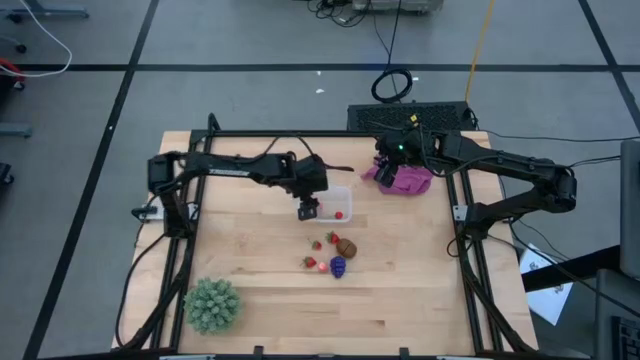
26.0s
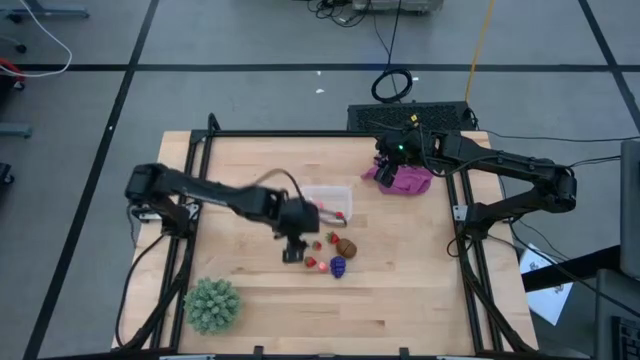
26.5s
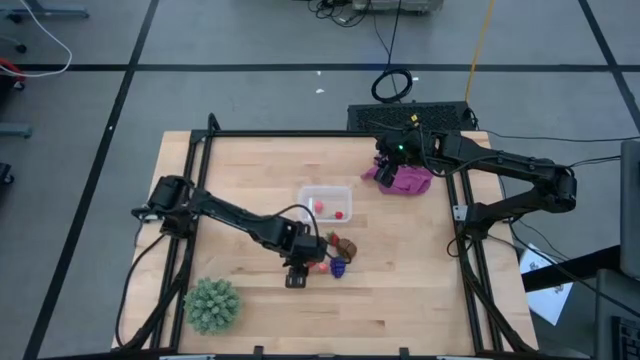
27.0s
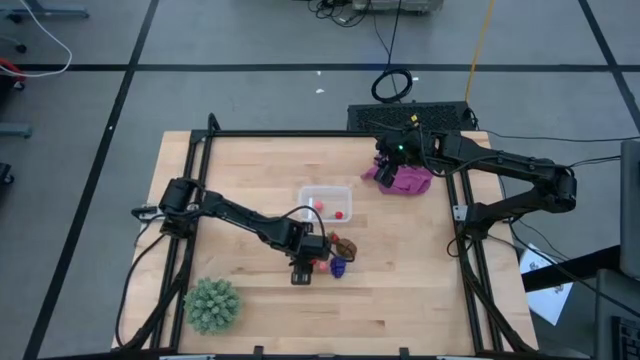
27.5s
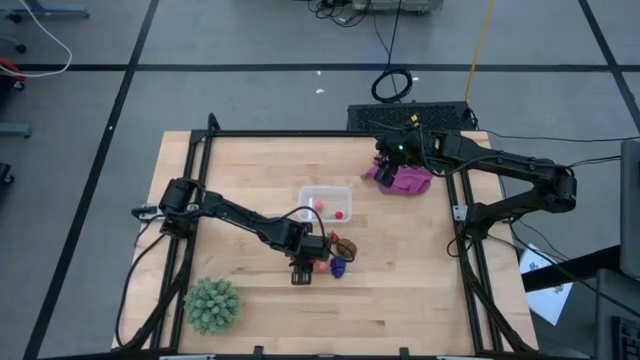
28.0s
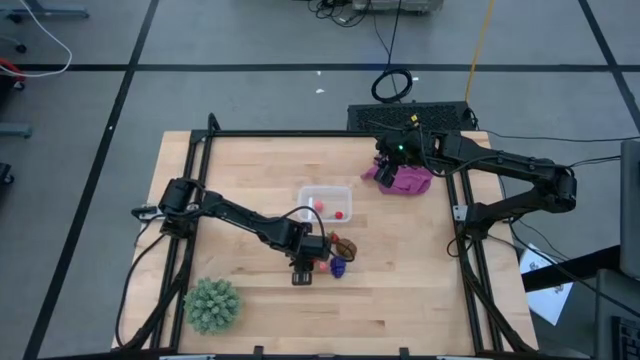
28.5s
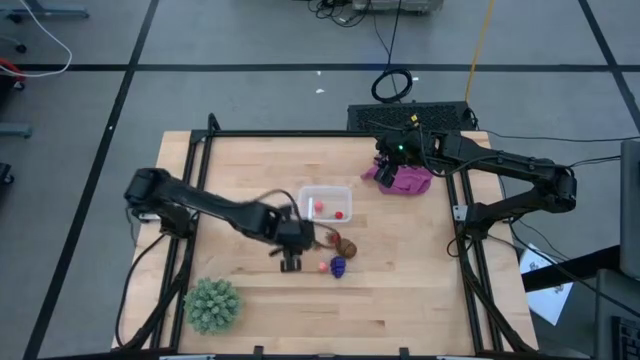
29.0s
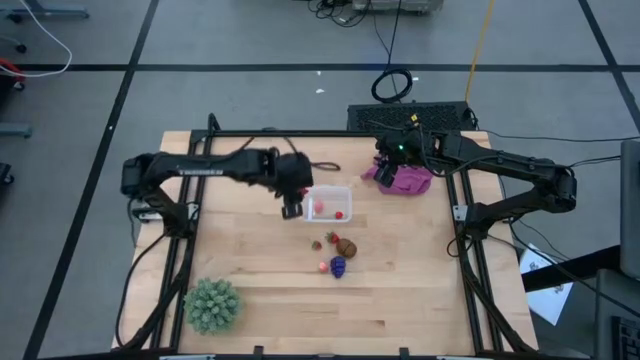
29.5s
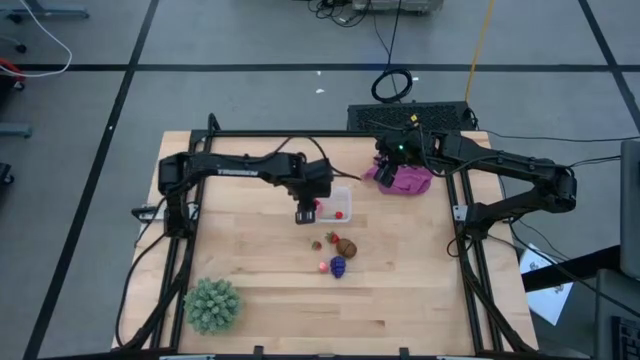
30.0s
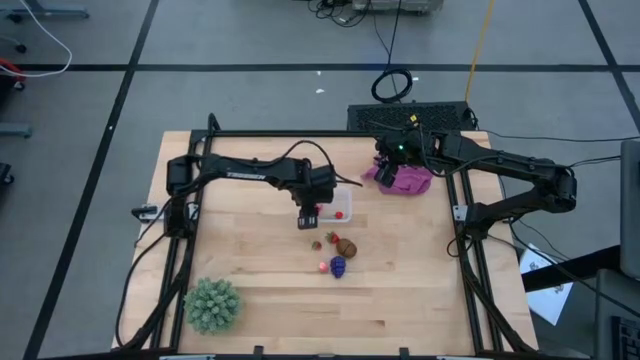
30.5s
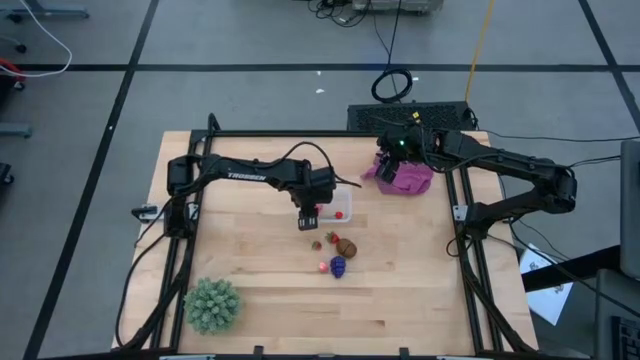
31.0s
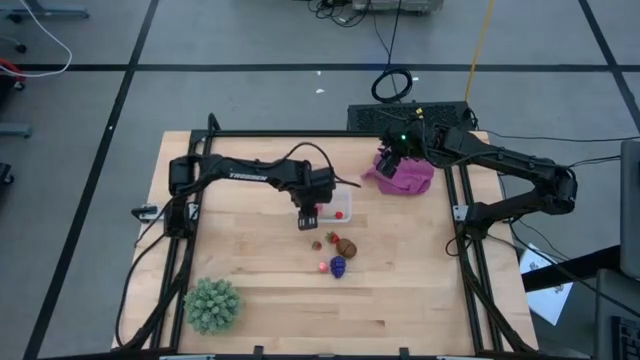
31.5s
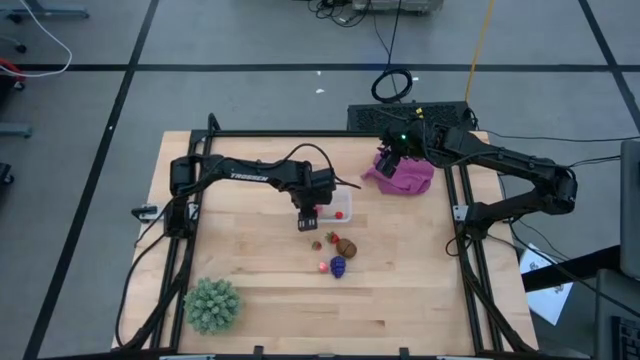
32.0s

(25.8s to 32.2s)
Task: Pick and placing Produce into tupperware
Put the bottom strawberry into the transparent bin

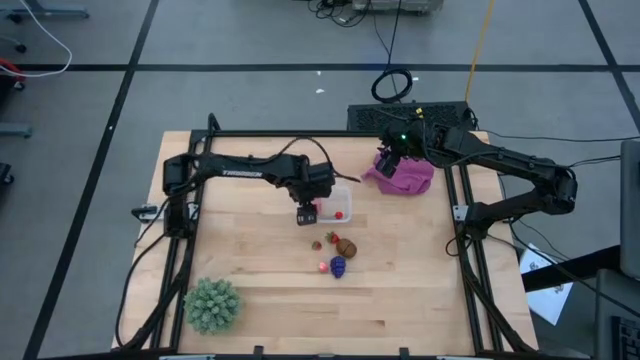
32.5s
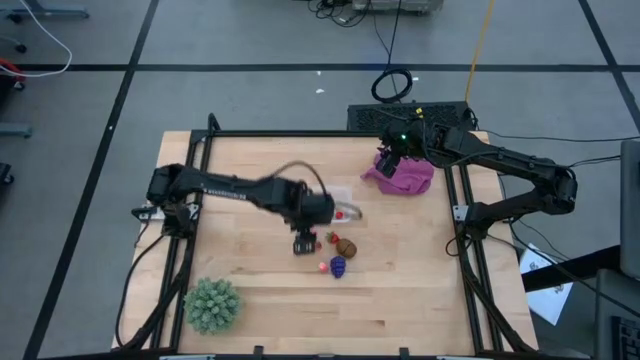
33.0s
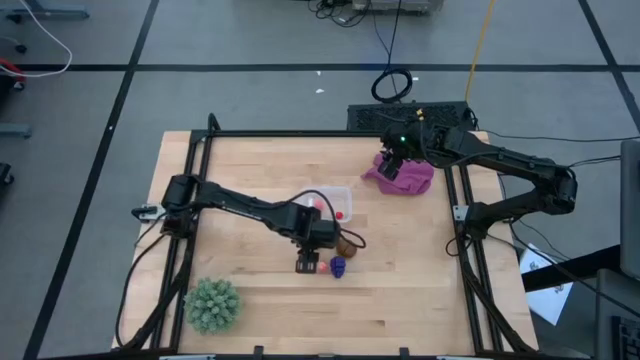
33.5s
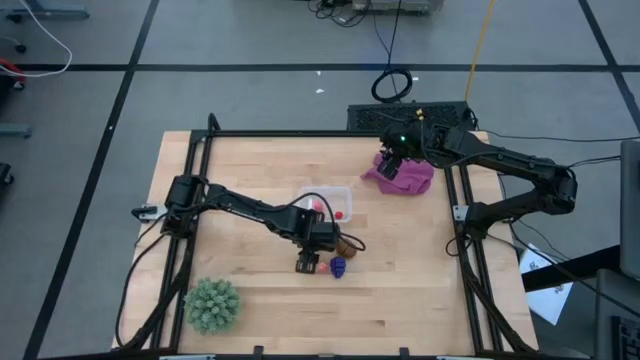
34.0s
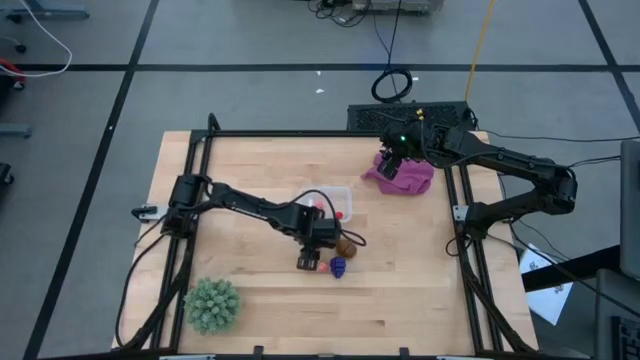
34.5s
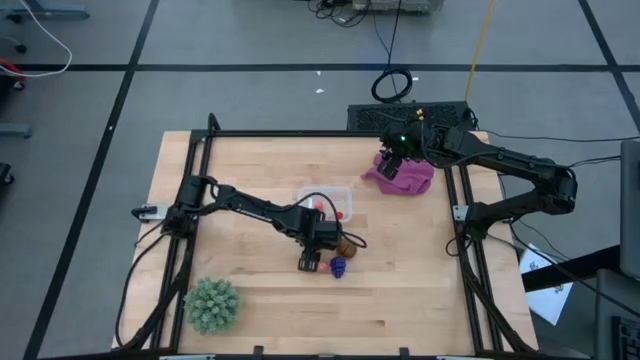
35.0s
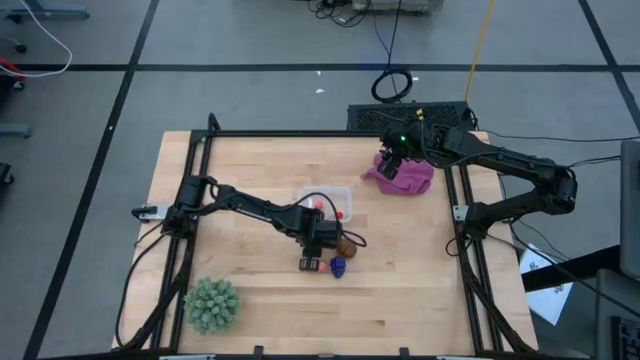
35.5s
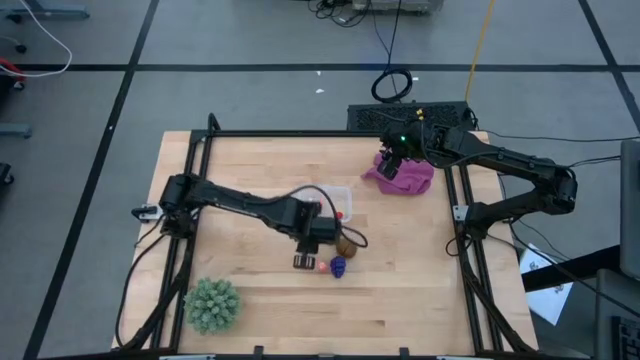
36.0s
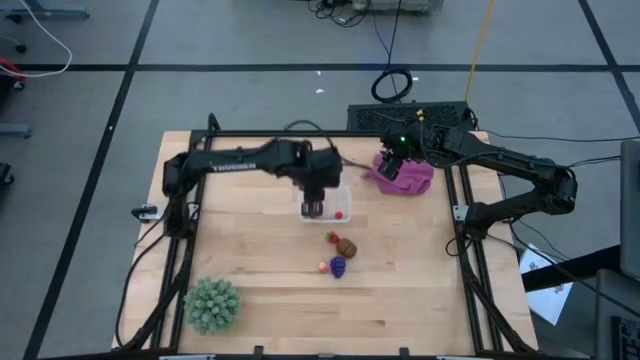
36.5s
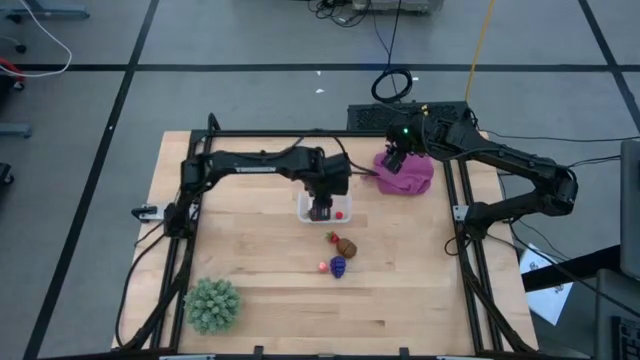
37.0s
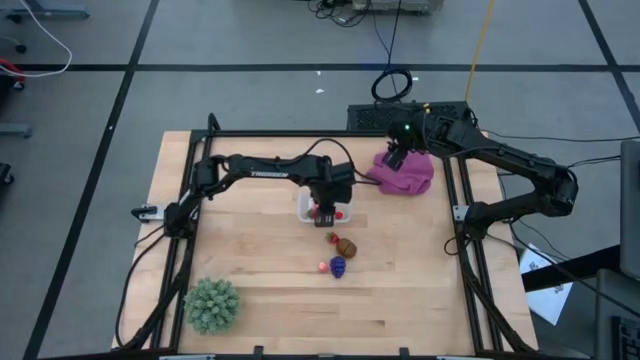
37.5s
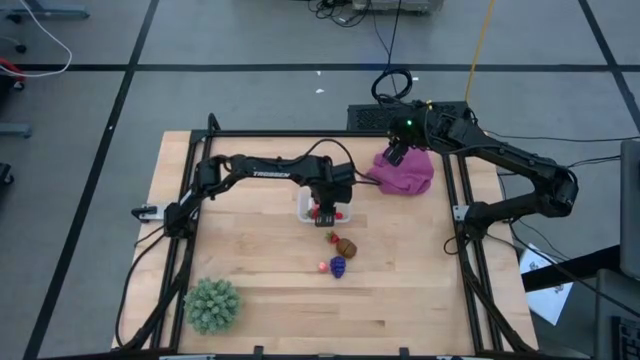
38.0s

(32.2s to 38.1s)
Put the left strawberry into the transparent bin

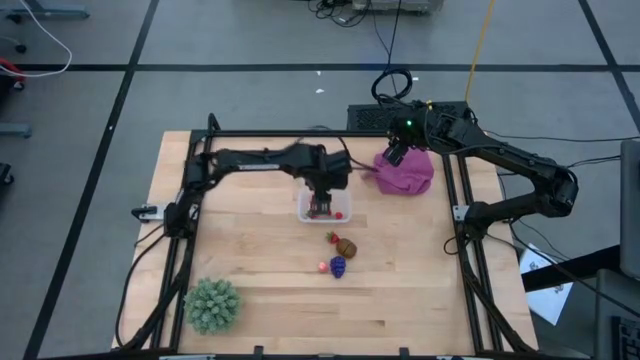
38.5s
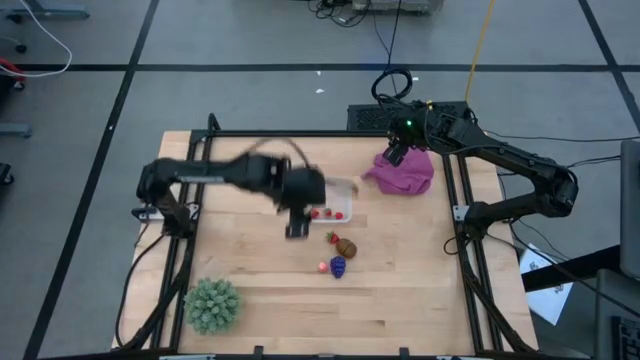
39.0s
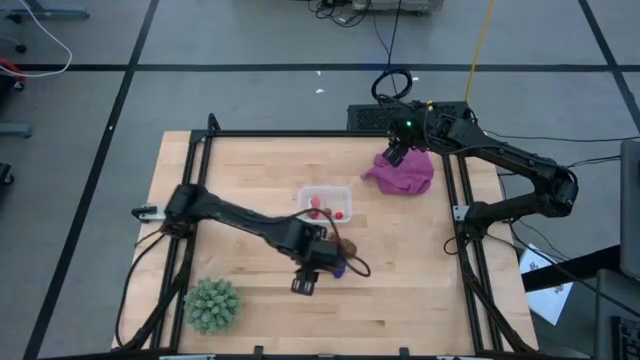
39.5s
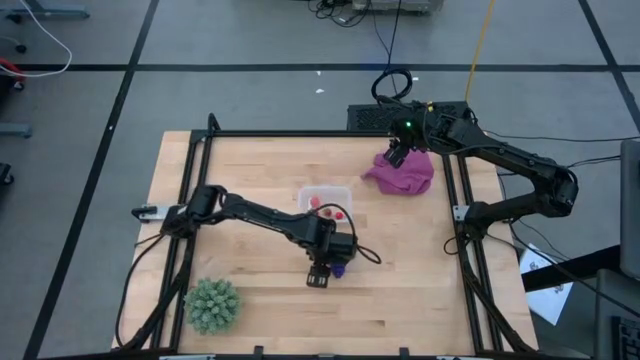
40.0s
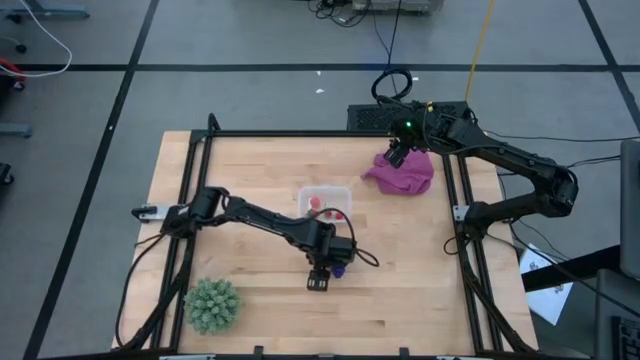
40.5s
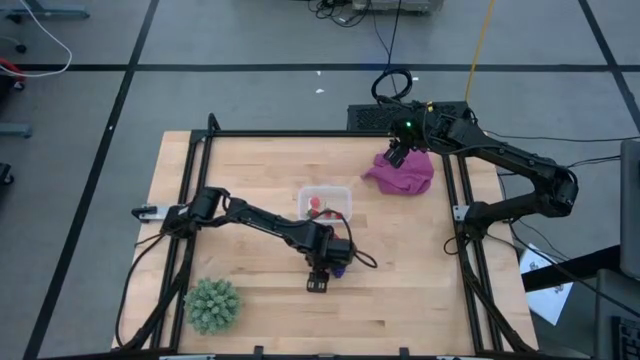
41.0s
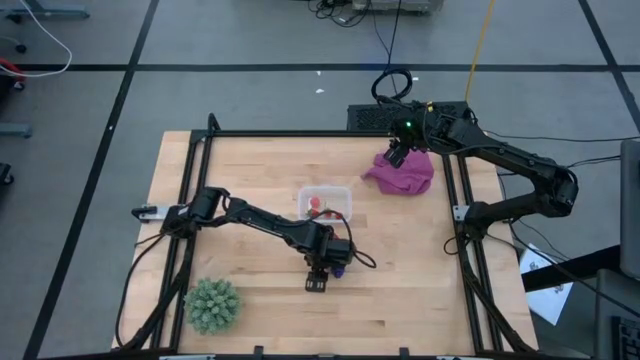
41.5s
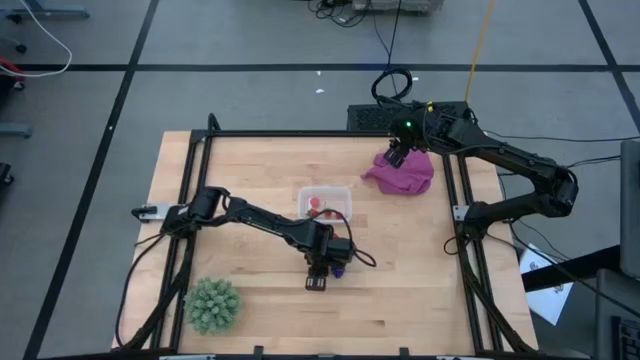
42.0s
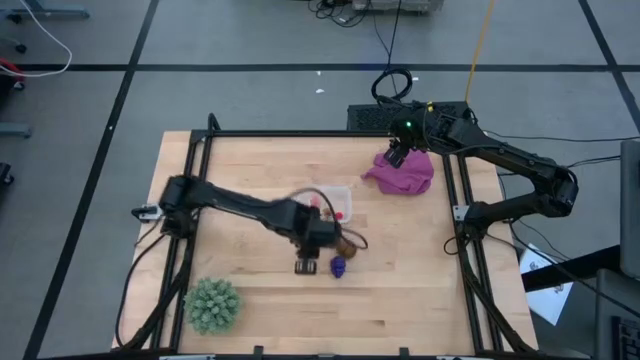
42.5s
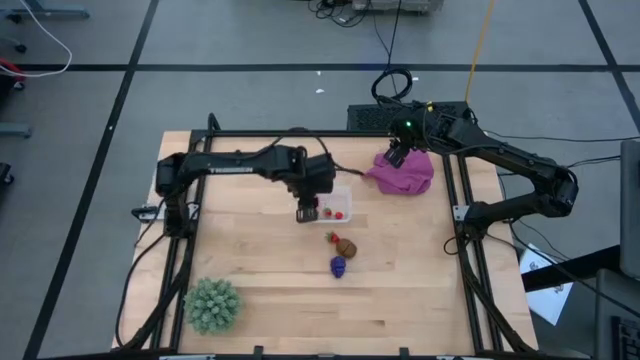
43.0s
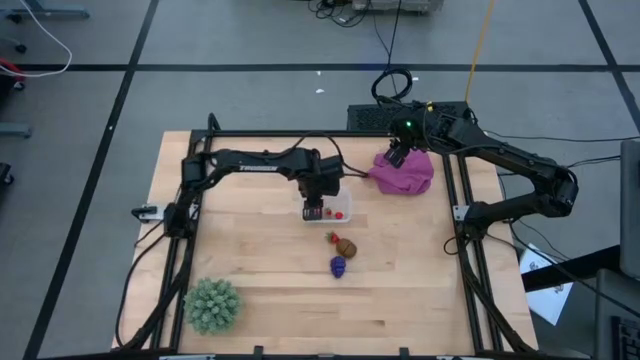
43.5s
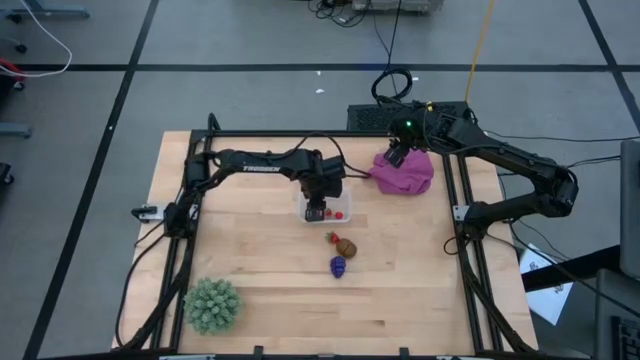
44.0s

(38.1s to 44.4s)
Put the peach into the transparent bin

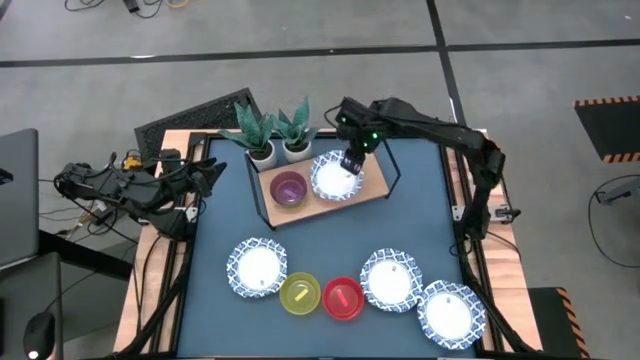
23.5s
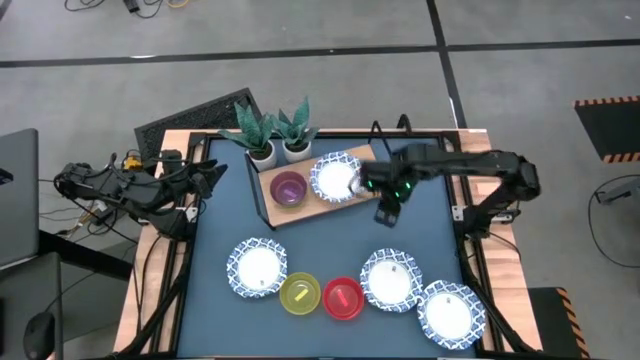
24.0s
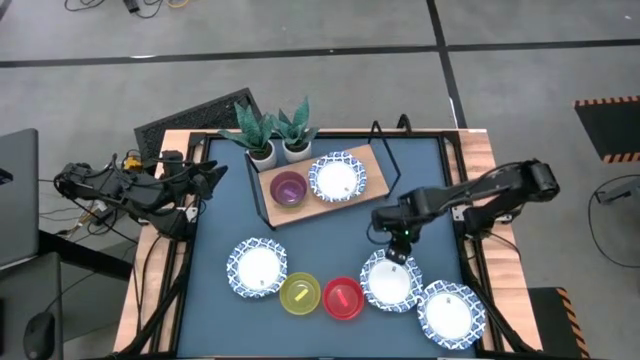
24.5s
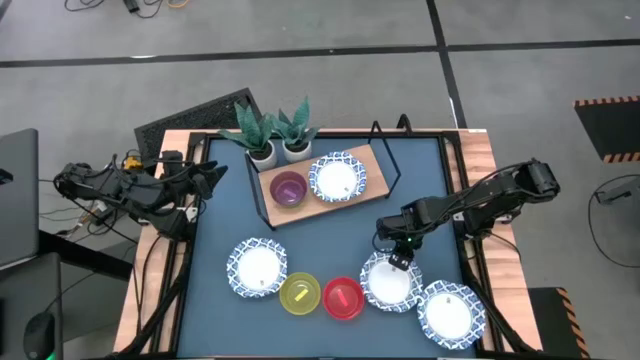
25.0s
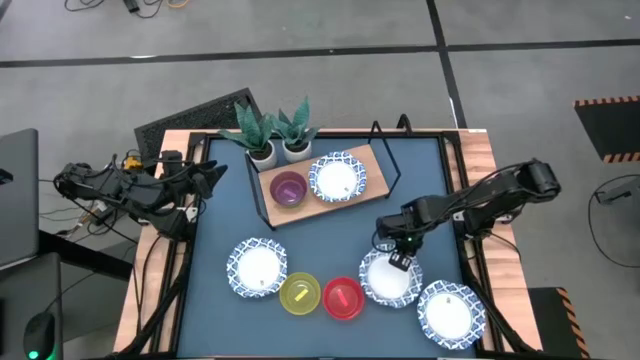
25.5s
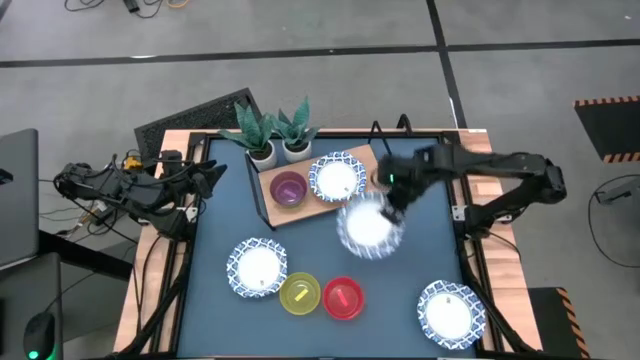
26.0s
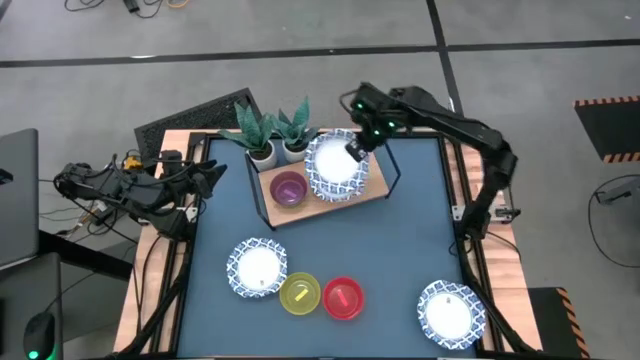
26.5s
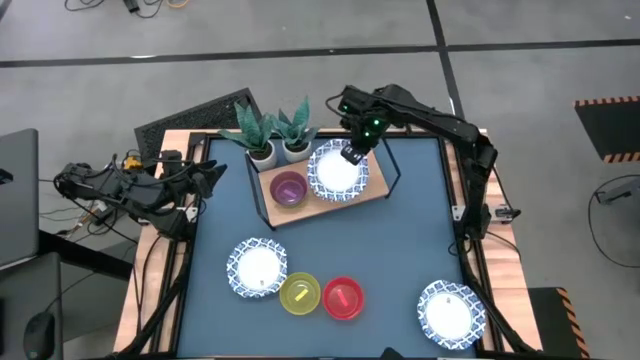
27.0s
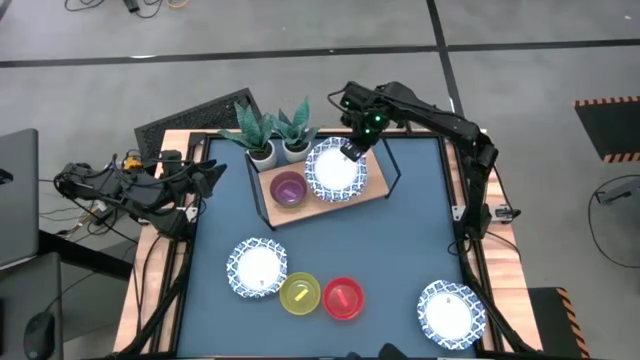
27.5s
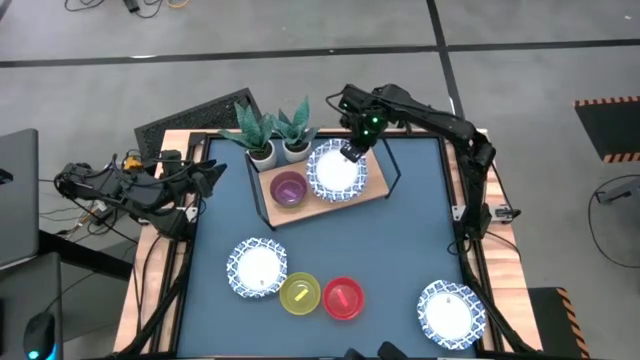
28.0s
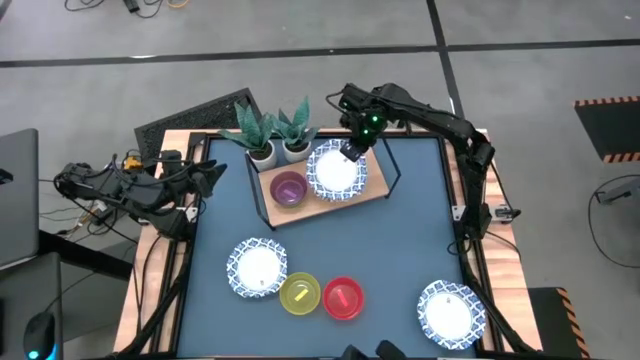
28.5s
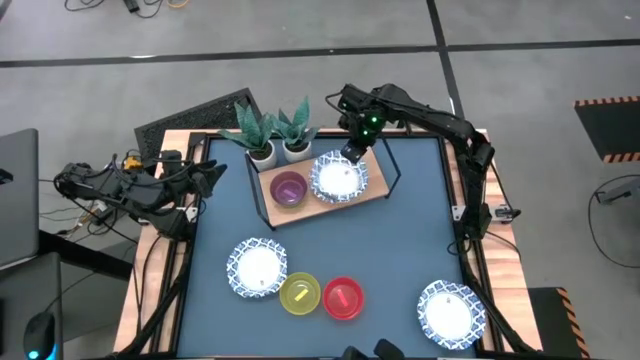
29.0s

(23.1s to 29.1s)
Task: Place and stack bowls onto a shelf
Stack the white patterned bowl on top of the white patterned bowl on the shelf
